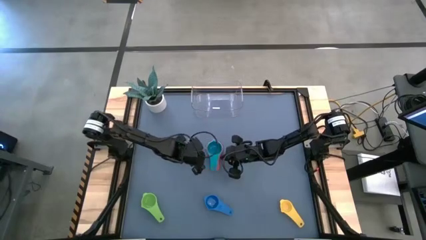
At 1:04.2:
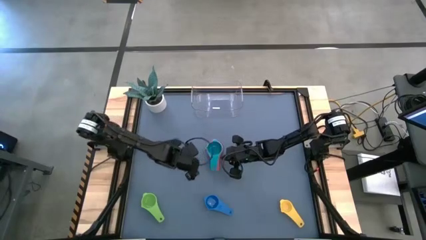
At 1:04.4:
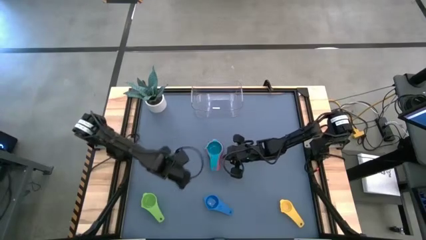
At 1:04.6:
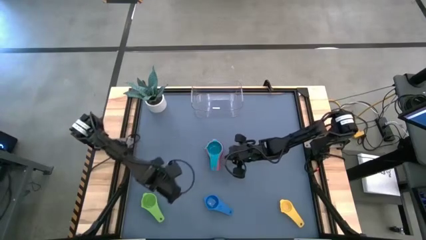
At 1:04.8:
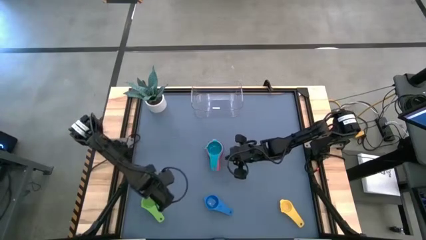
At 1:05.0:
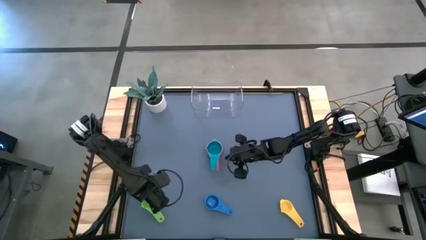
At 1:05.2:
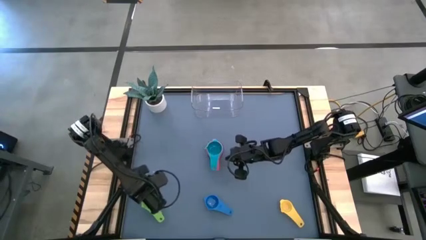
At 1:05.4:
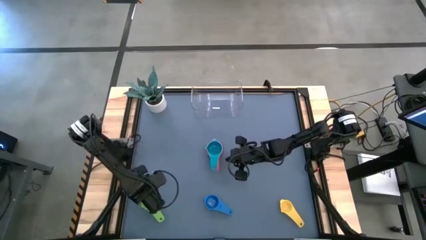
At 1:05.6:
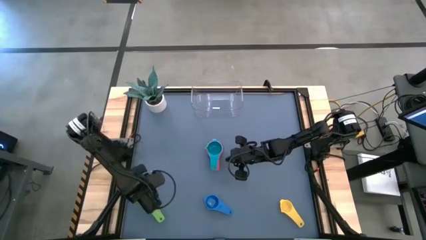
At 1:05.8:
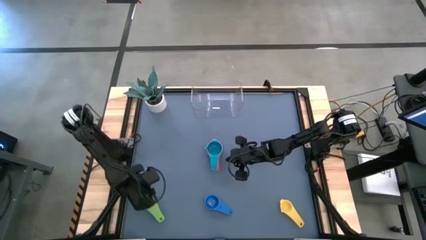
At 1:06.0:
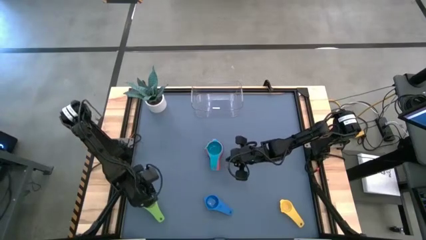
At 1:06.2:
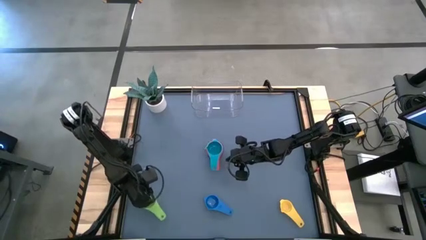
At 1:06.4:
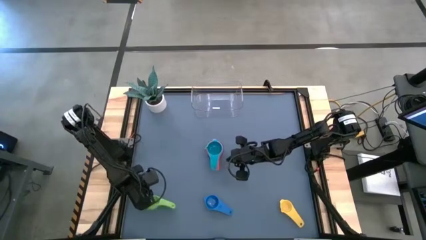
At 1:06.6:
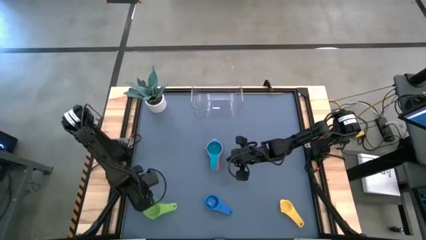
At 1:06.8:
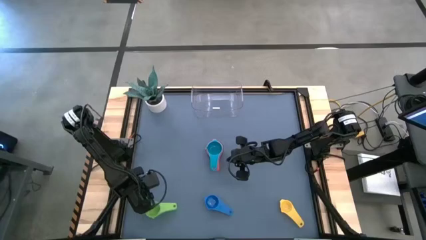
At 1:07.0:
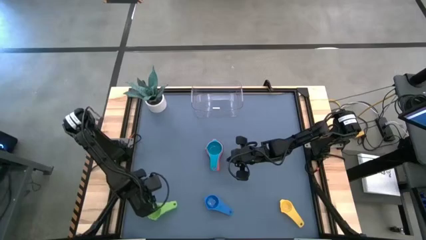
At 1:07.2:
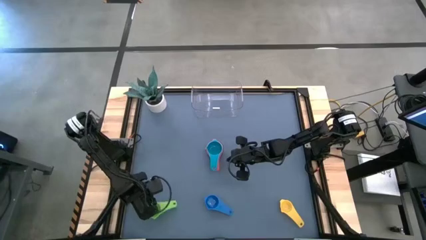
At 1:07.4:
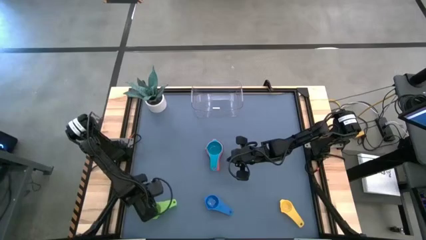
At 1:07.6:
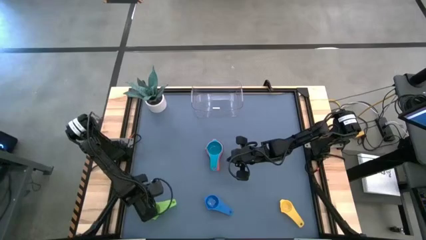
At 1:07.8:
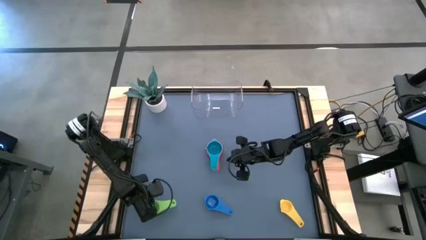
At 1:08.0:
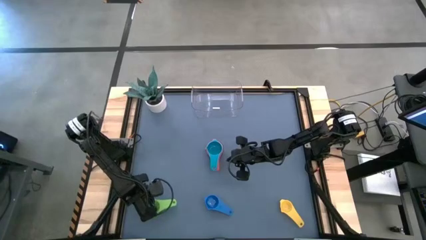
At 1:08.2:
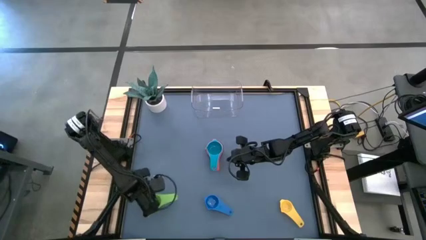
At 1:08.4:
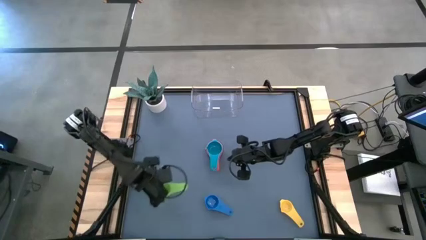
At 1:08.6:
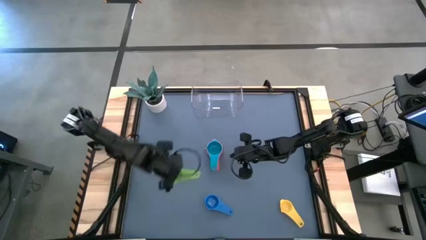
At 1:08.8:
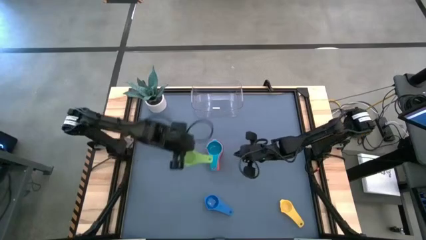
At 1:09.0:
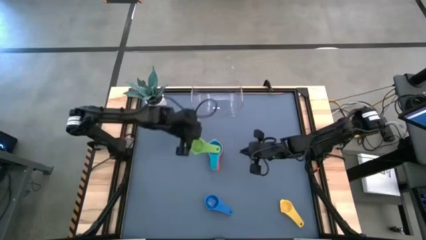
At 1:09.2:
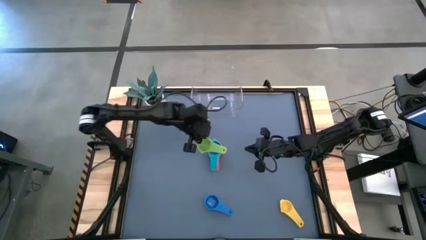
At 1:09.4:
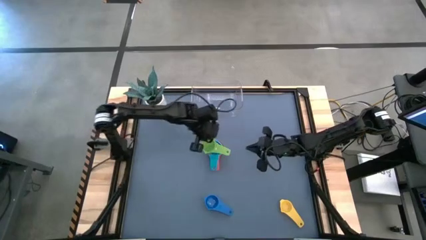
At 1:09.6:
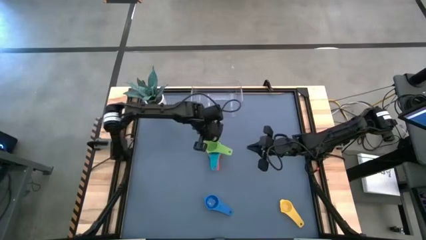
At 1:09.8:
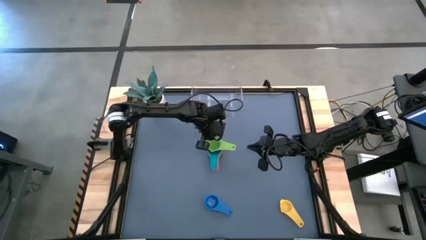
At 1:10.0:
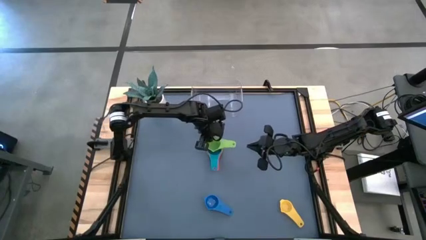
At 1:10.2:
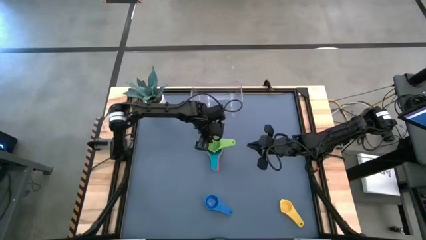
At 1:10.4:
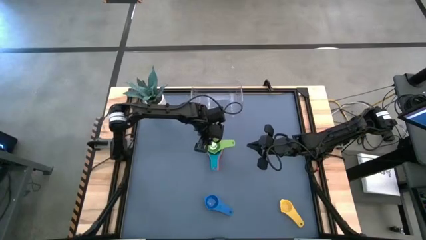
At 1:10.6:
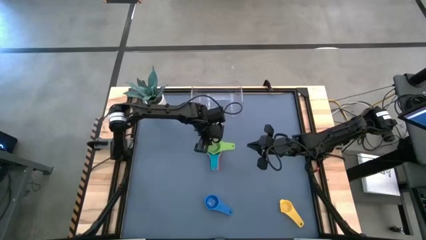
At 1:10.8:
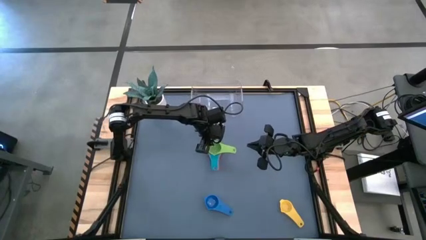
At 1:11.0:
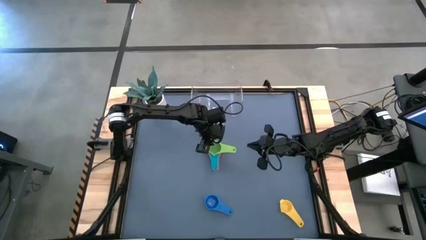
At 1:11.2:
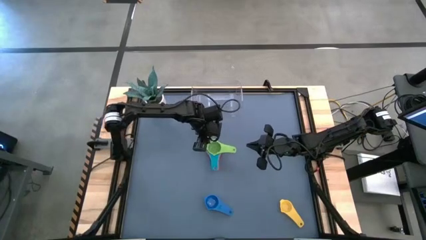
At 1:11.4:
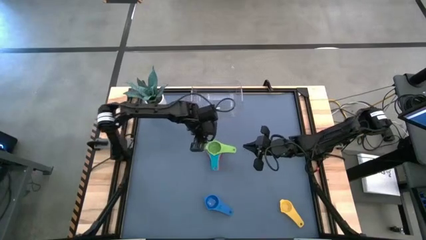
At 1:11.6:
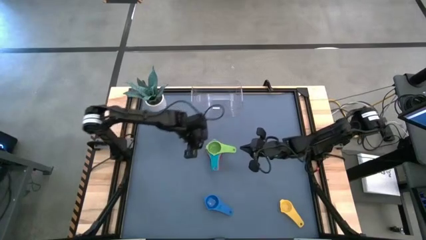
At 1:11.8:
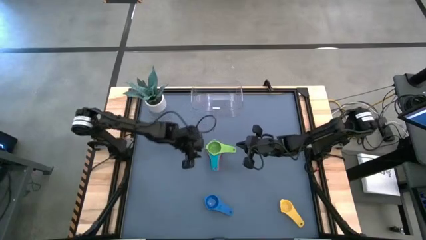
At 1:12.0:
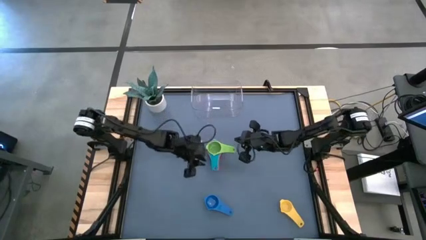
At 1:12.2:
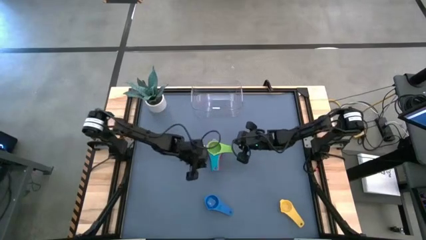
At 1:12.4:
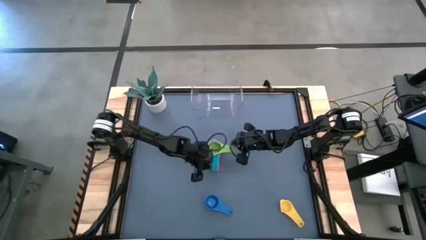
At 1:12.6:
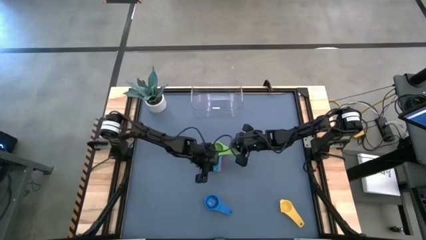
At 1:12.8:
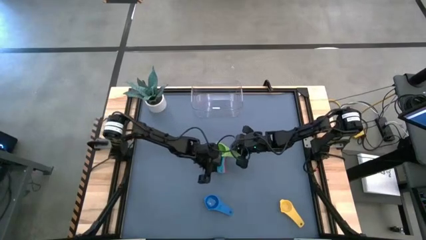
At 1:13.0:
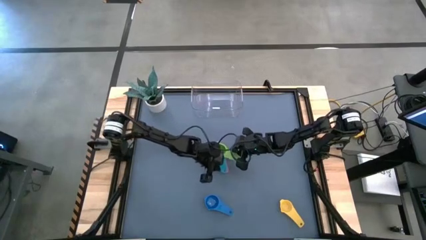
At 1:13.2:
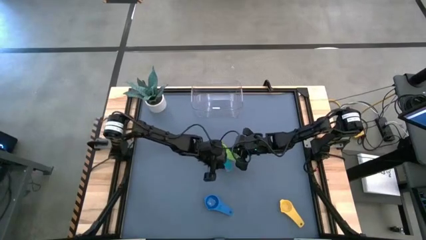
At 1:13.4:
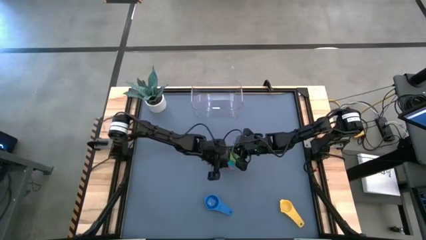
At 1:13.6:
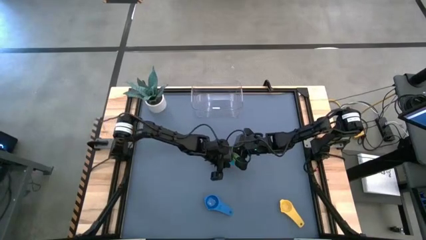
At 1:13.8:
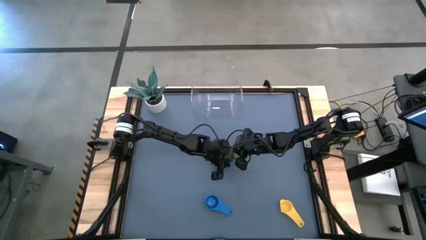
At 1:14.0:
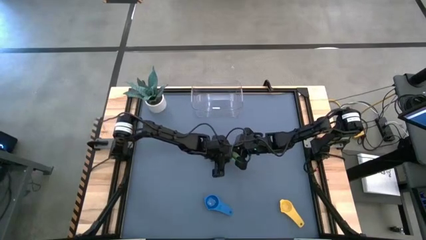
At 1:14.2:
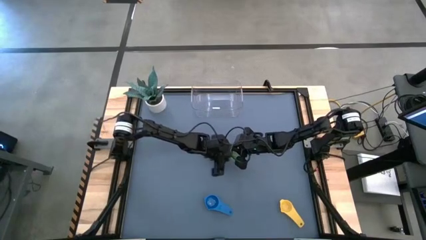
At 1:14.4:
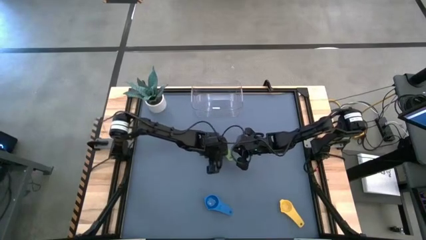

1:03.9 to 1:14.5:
Task: Nest measuring cups in basket
Stack the green measuring cup on top of the light blue measuring cup

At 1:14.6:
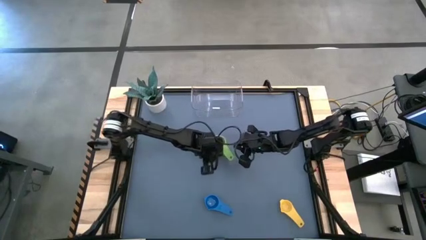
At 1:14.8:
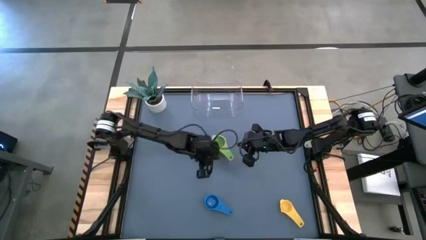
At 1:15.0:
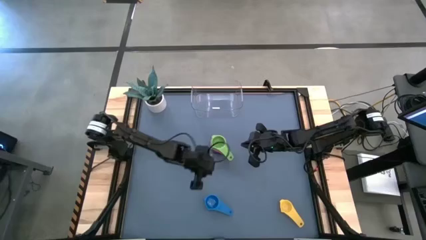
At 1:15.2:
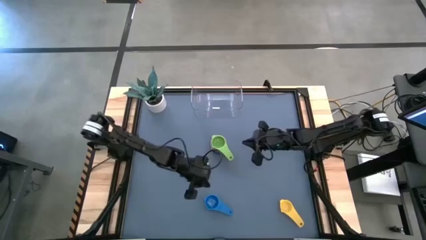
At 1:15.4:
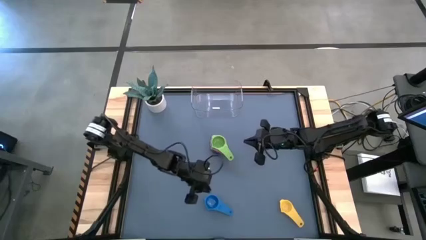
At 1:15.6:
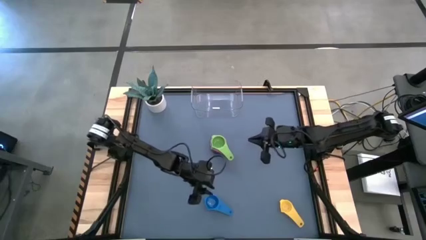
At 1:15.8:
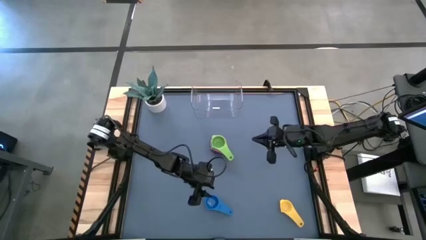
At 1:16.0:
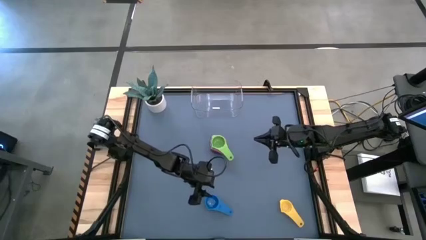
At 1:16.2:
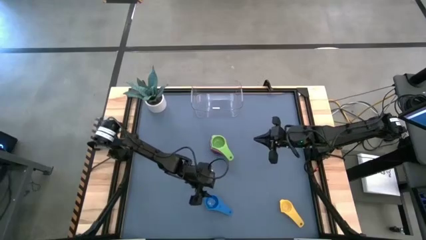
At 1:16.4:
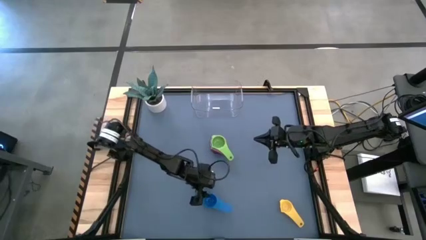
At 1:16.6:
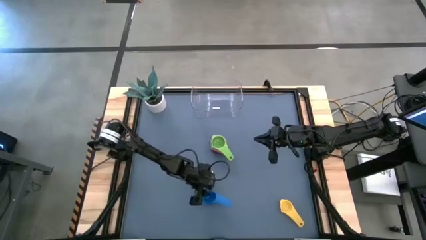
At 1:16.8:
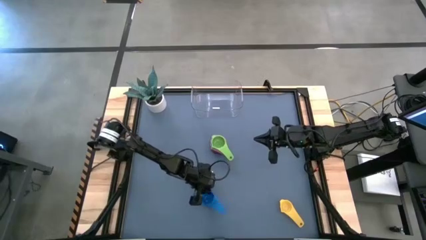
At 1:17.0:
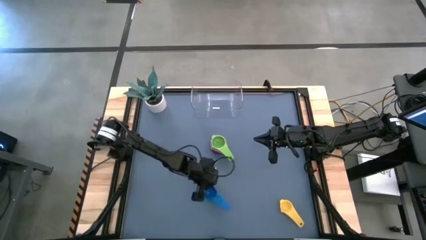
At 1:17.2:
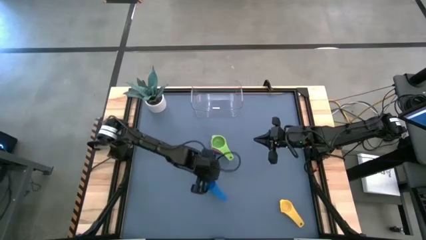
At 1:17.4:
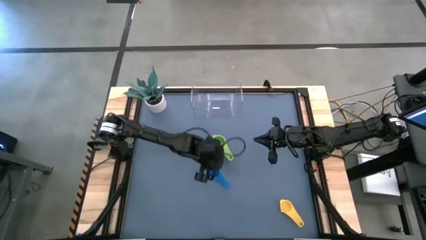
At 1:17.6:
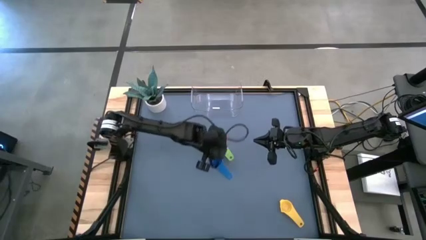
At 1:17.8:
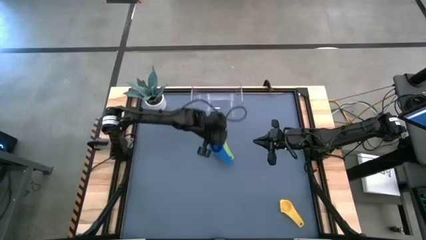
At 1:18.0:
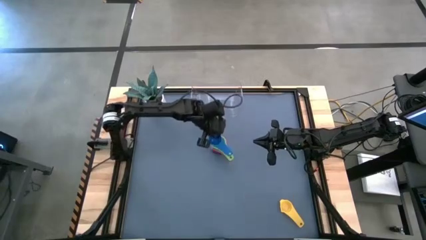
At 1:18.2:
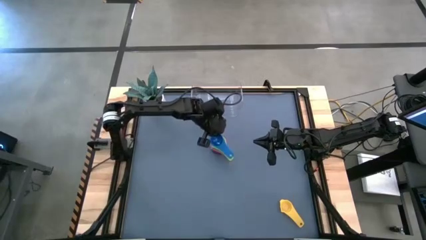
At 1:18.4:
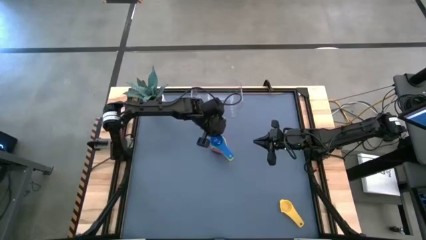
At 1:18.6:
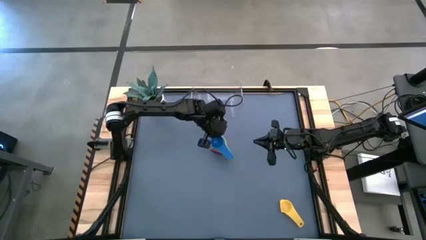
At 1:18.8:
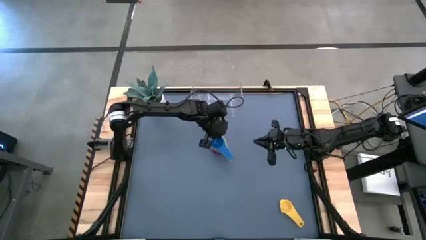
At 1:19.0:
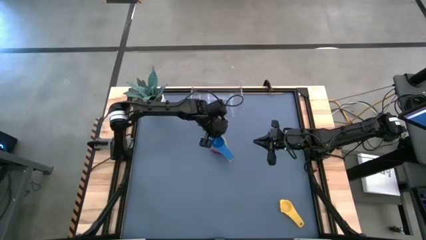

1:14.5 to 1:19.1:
Stack the blue measuring cup on top of the green measuring cup

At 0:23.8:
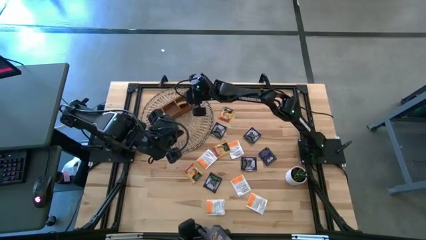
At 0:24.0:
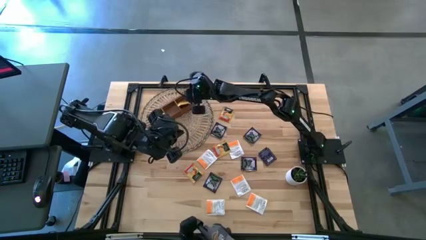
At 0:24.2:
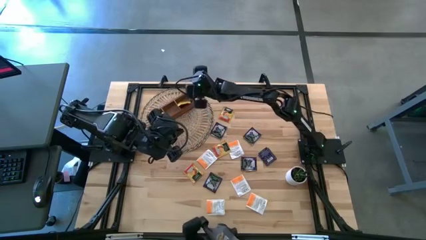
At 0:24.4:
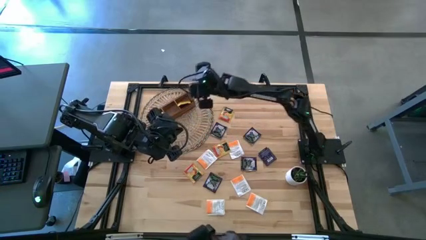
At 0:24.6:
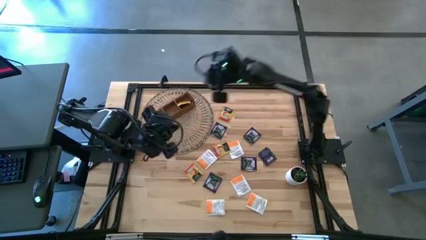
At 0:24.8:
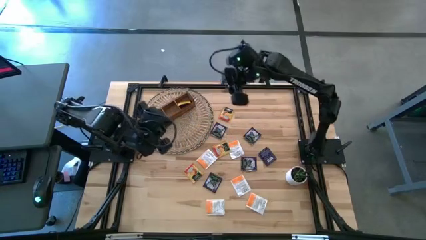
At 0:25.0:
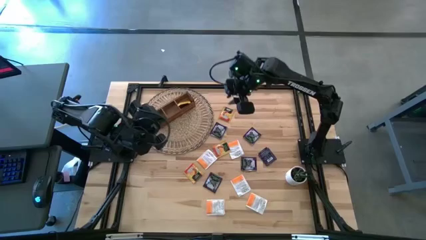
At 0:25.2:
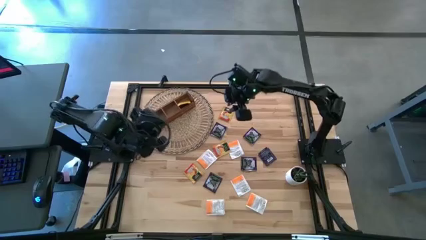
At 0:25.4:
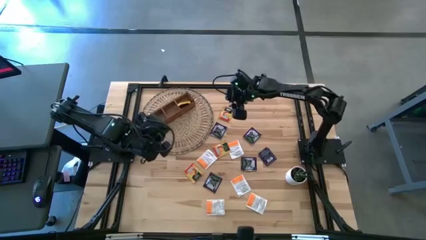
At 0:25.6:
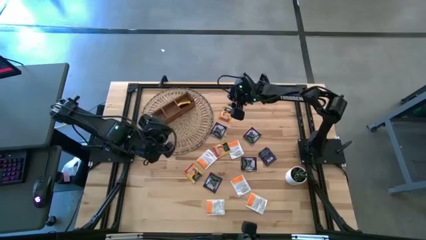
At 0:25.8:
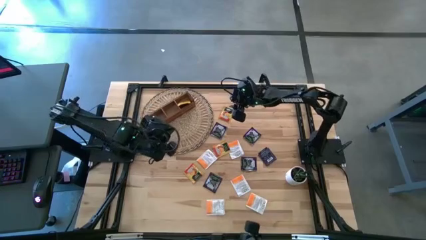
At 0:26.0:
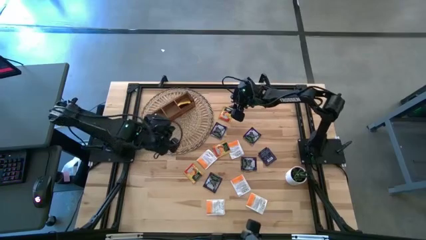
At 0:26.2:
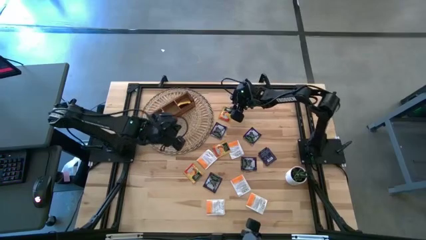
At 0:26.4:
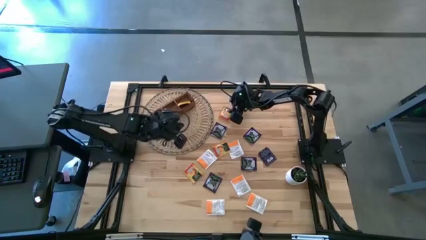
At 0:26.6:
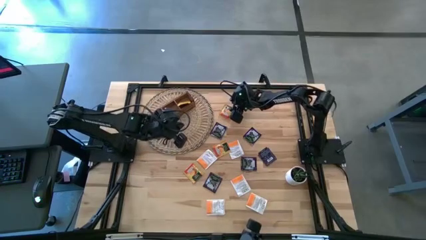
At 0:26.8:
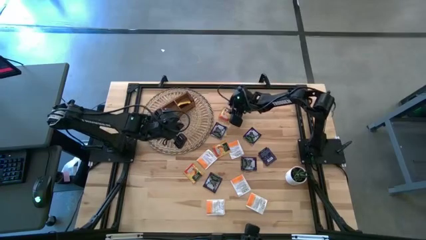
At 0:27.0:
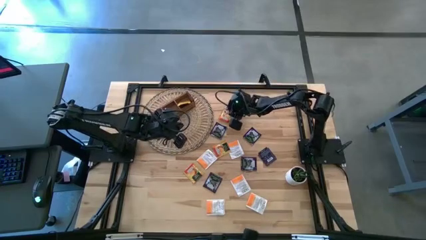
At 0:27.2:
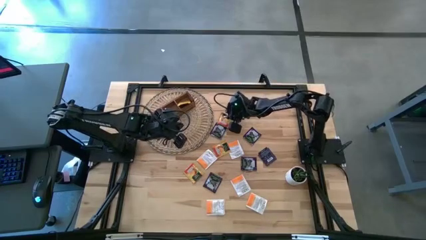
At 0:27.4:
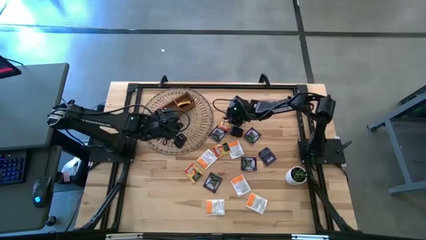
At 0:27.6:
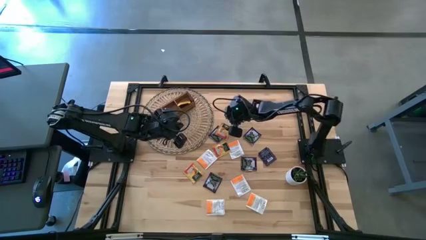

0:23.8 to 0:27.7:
Task: Pick & Place Tea
Put the yellow tea bag into the right section of the wooden organizer
